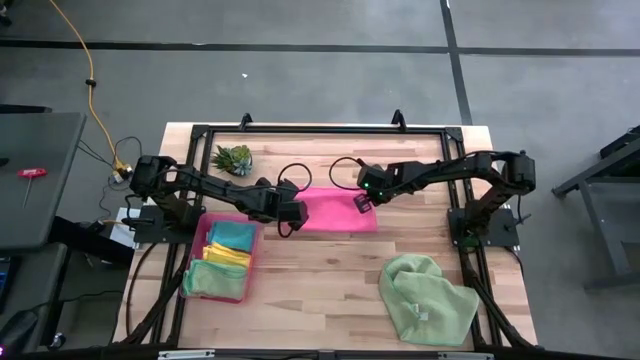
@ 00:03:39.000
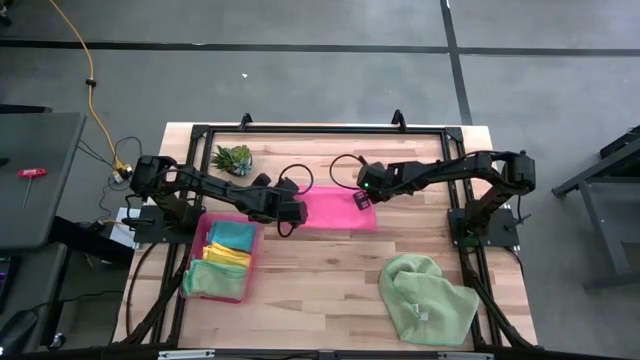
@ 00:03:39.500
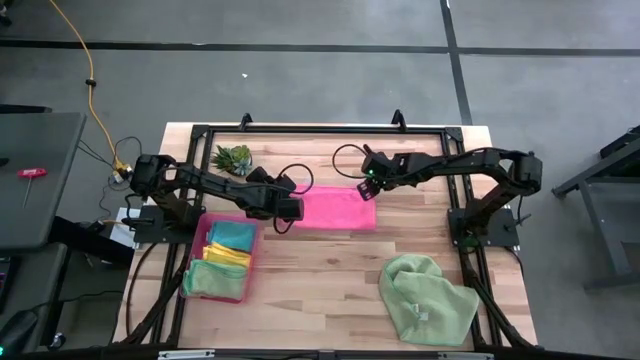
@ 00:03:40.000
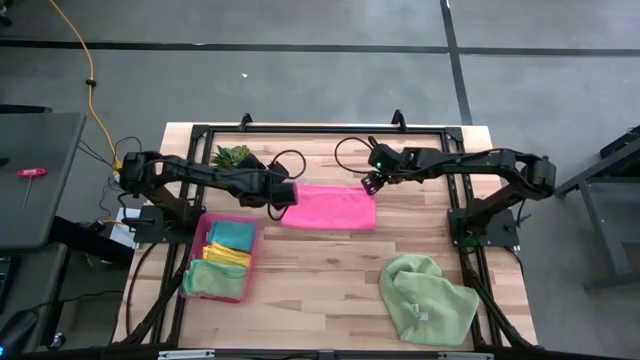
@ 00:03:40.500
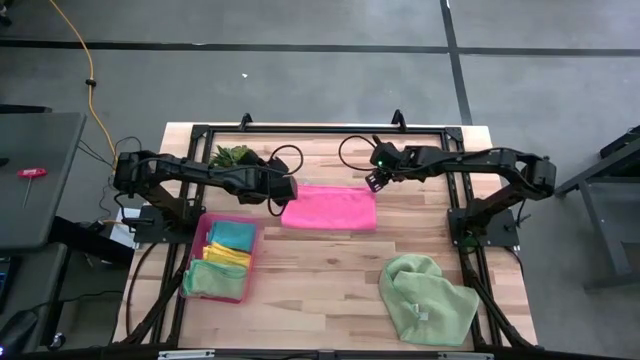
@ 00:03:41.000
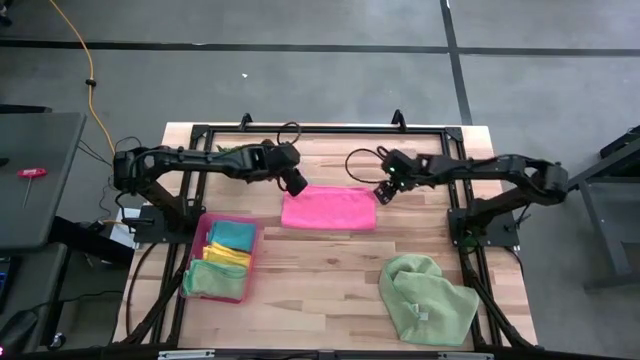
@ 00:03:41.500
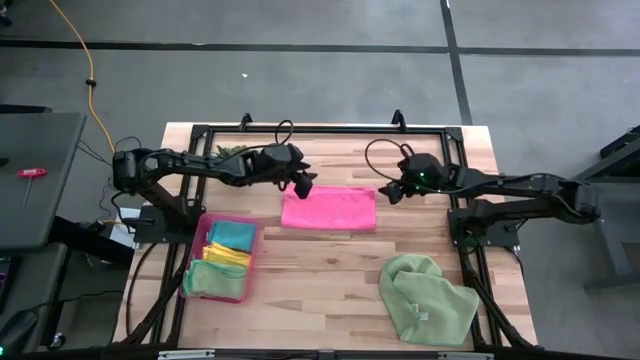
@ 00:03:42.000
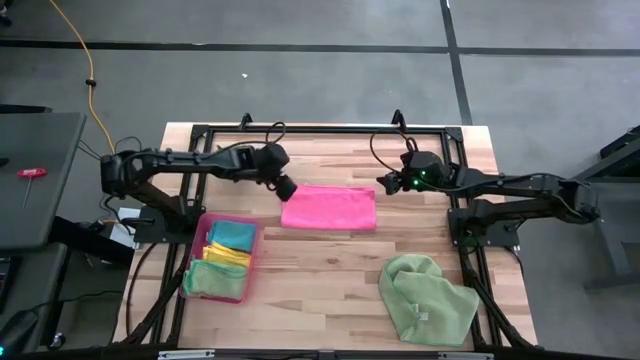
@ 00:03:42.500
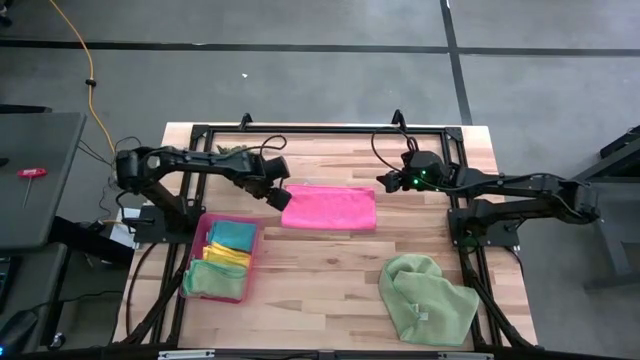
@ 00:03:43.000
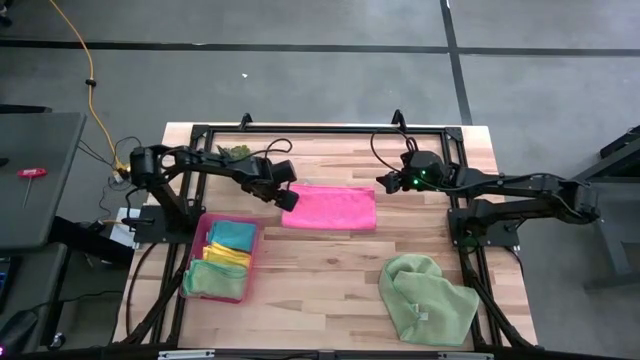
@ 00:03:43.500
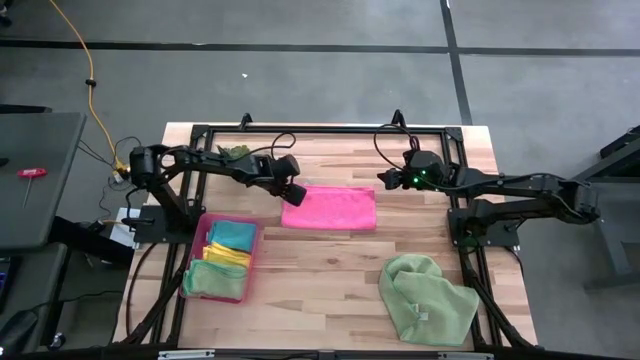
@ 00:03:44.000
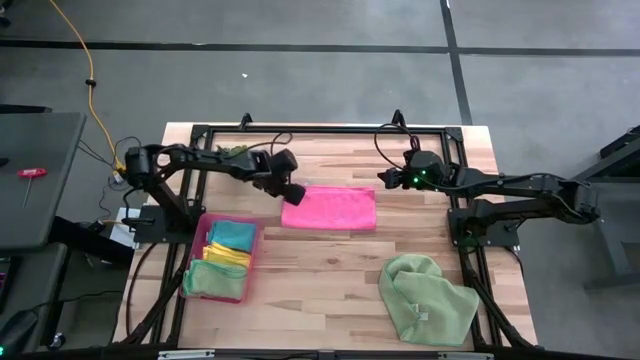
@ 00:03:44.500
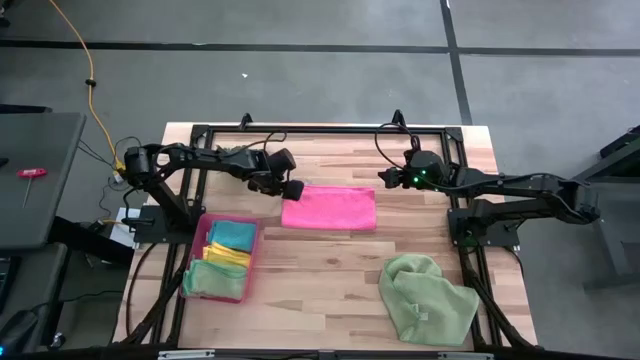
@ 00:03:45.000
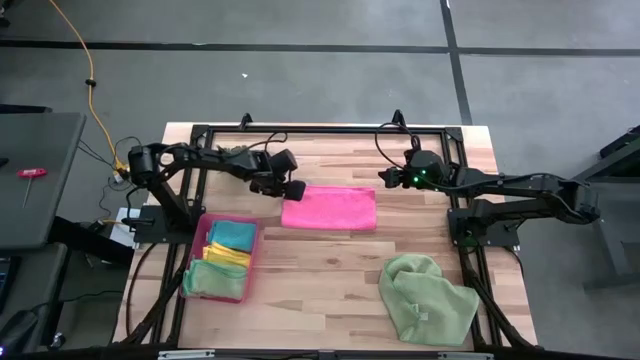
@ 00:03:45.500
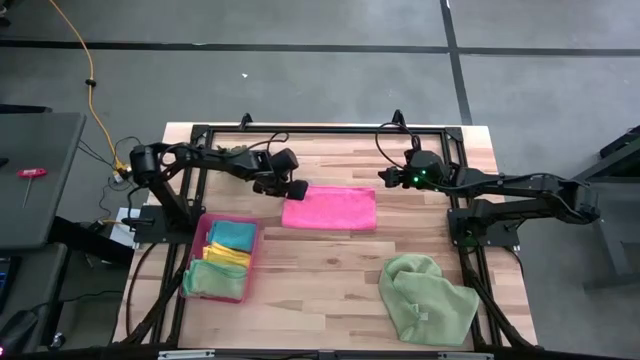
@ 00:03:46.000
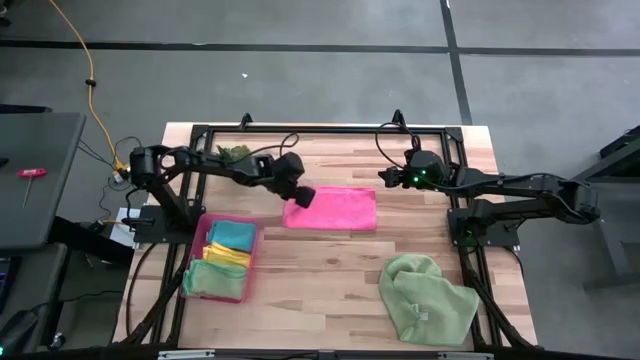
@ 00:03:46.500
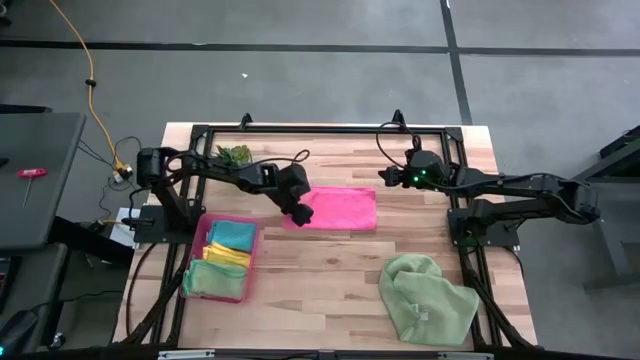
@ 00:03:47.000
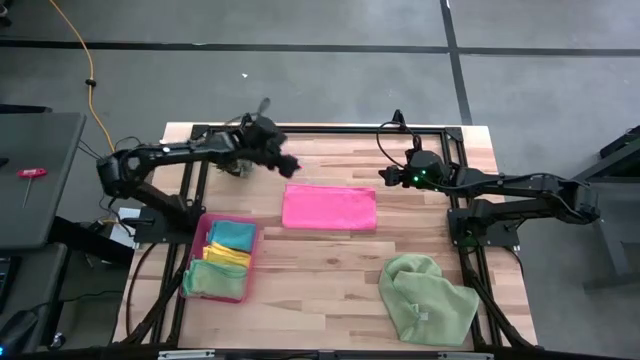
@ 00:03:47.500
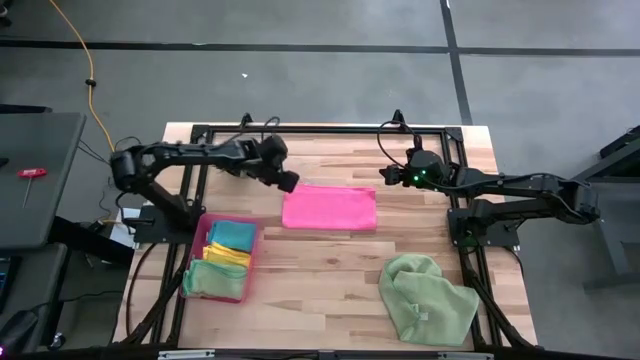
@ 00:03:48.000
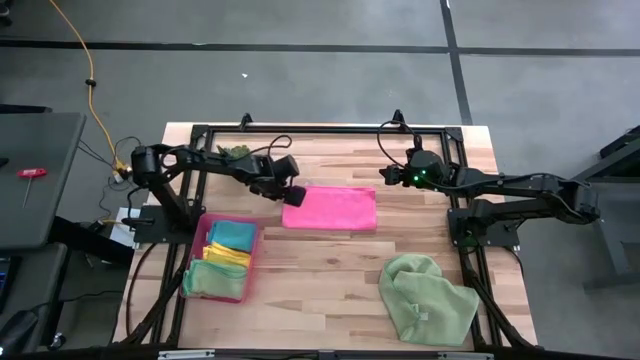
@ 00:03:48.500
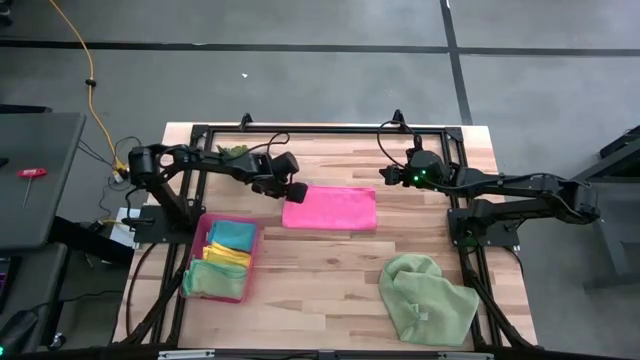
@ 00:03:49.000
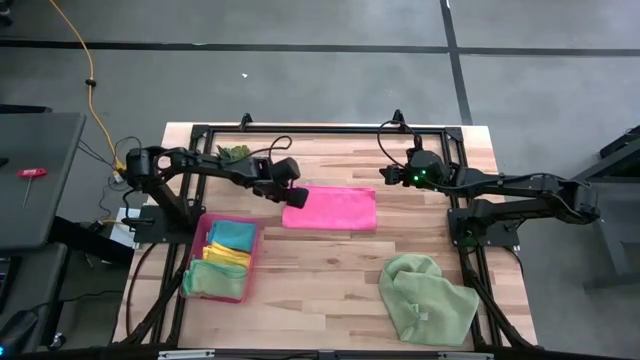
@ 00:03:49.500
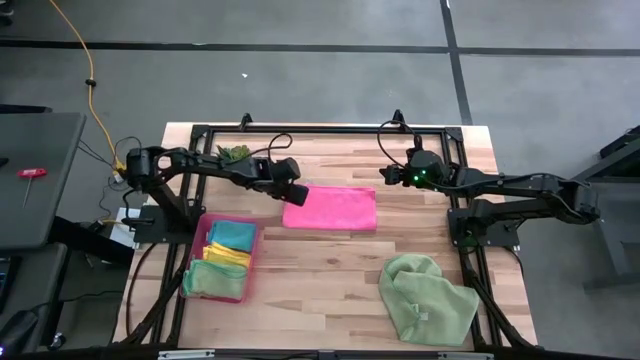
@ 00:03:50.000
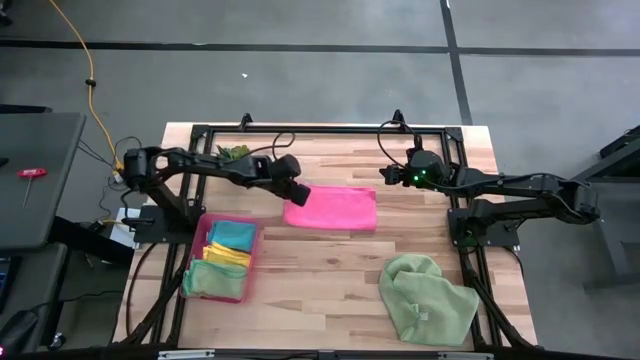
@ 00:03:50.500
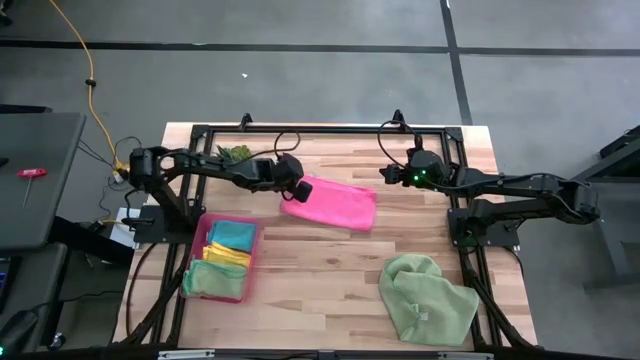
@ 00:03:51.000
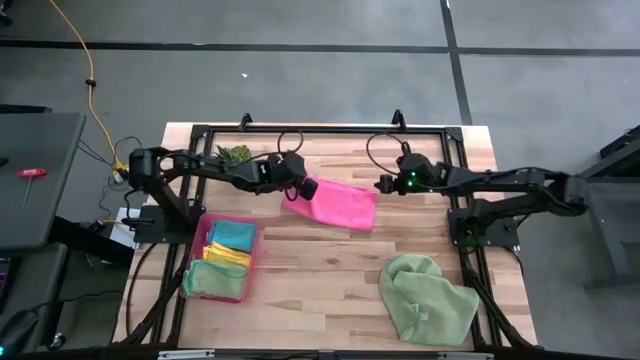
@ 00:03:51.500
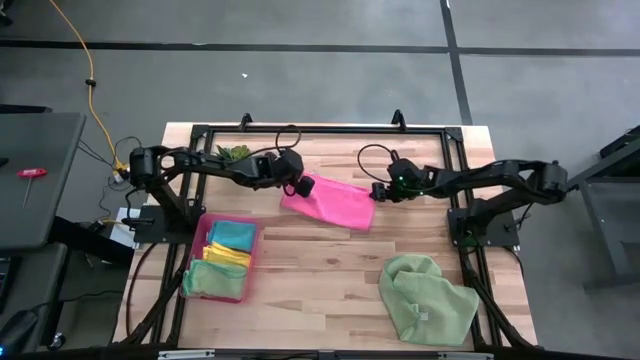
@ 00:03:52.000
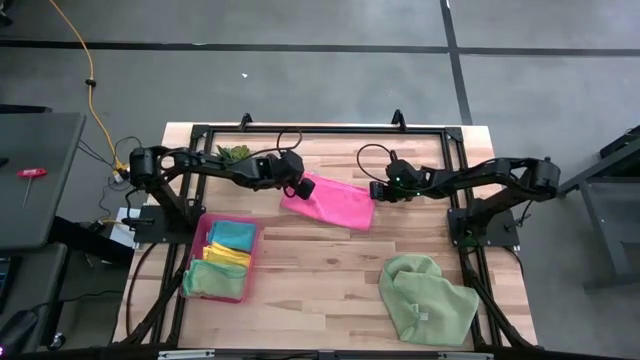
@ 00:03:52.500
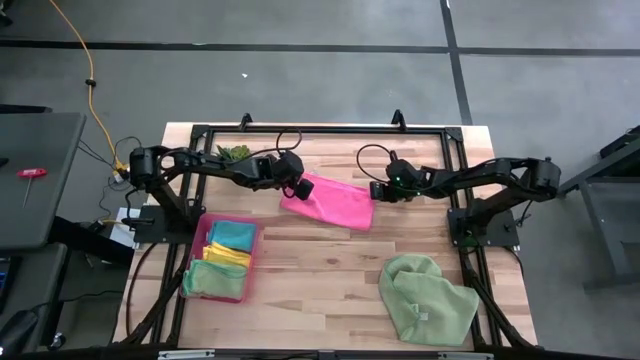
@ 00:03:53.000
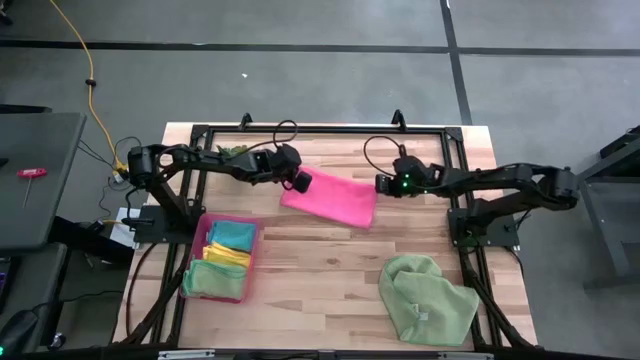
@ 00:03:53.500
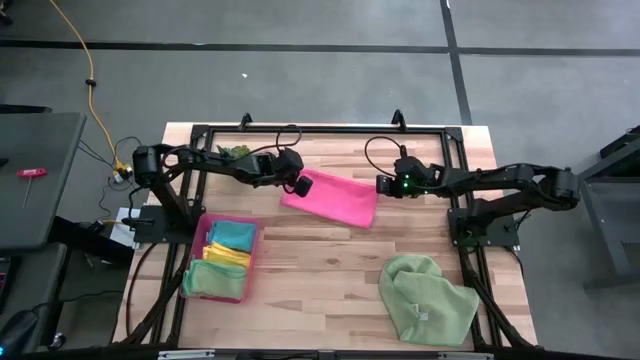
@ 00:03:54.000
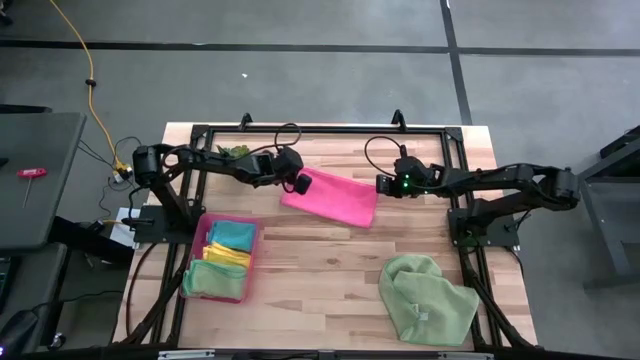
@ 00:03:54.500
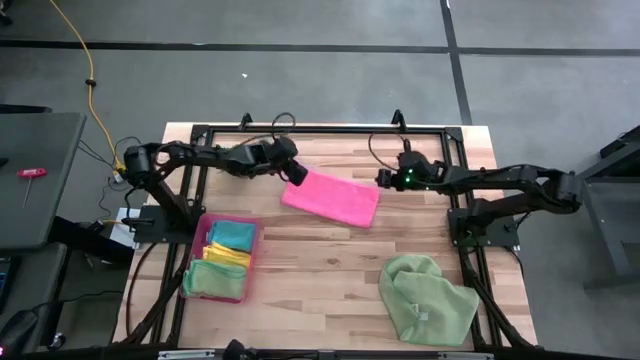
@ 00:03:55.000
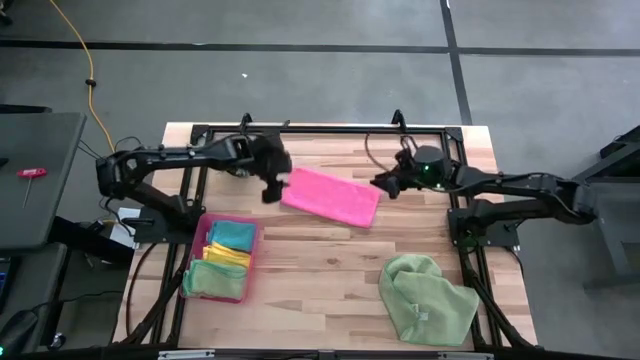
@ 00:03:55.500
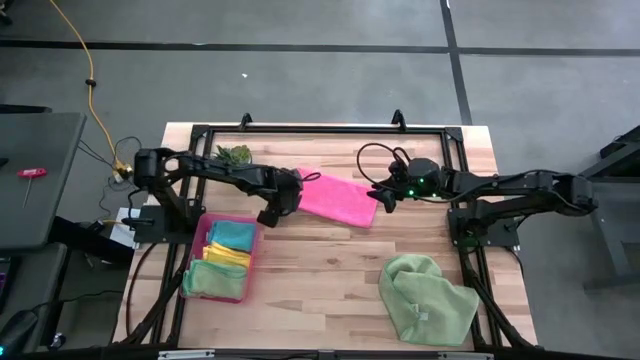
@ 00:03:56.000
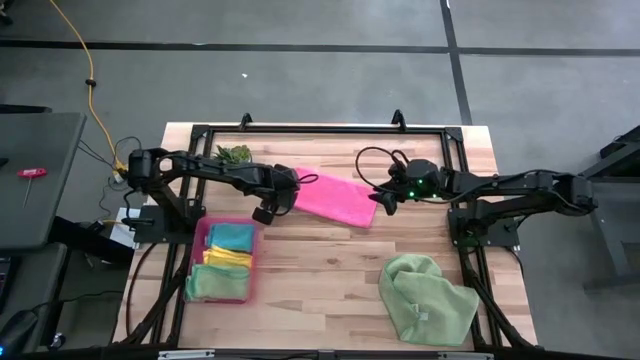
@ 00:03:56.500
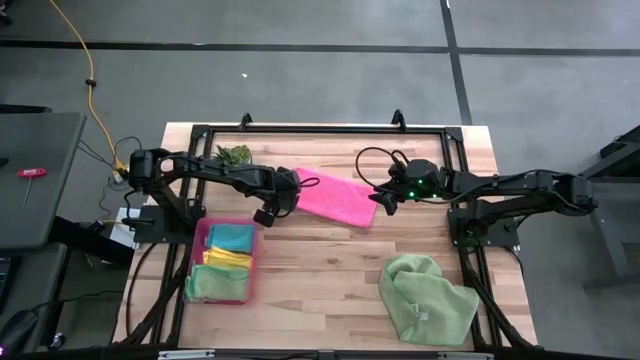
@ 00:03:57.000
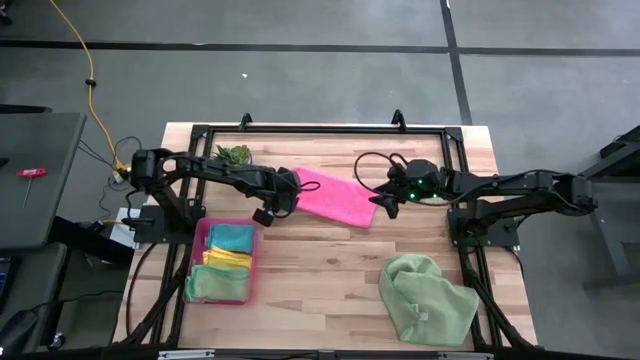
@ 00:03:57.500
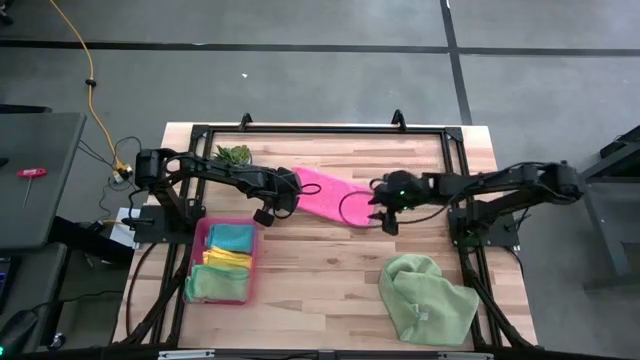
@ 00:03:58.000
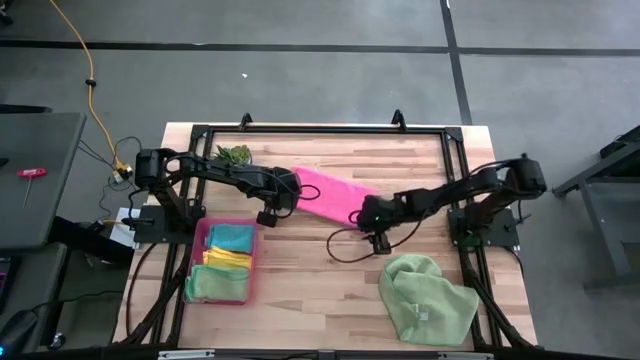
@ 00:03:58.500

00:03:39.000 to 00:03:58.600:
Task: Fold microfiber towels
Fold the pink microfiber towel
